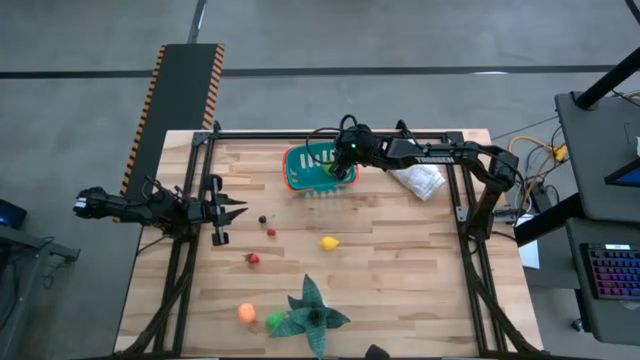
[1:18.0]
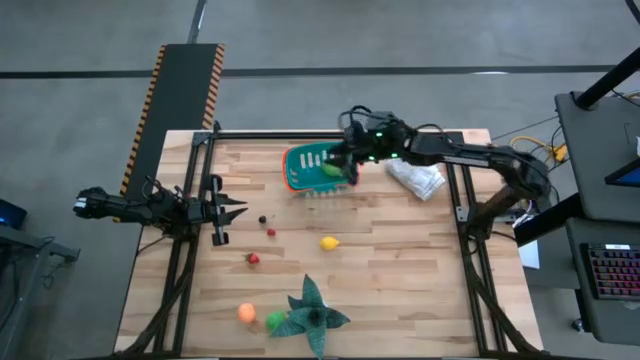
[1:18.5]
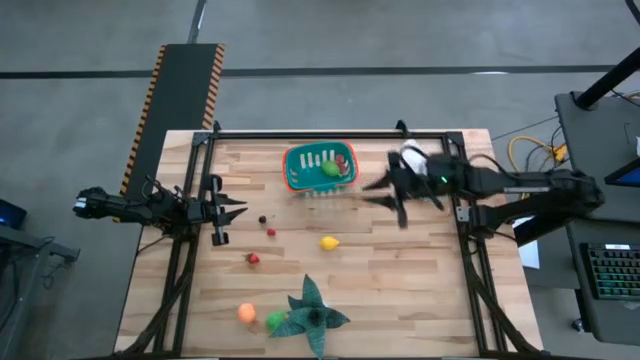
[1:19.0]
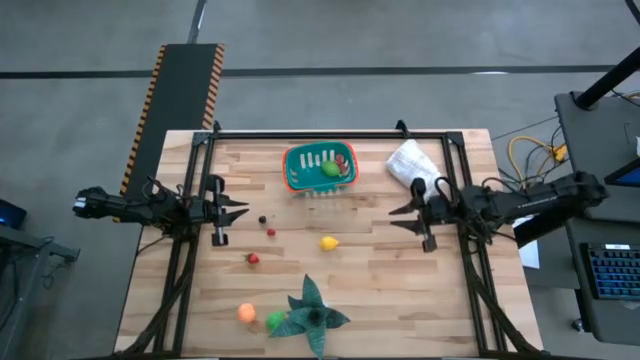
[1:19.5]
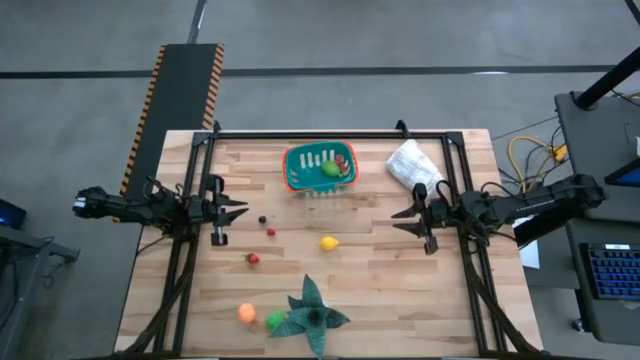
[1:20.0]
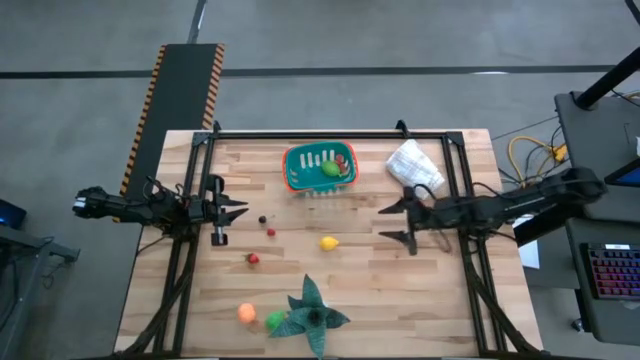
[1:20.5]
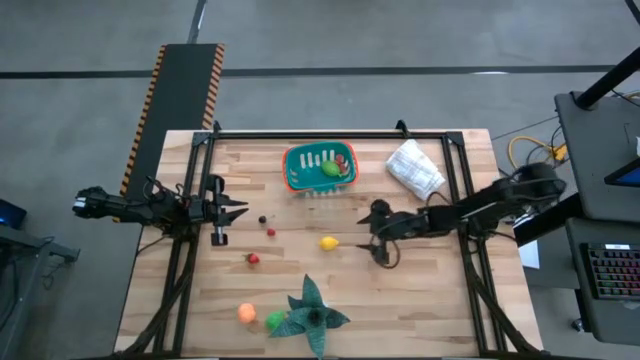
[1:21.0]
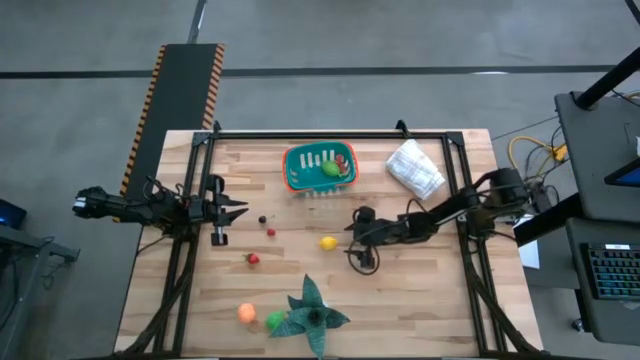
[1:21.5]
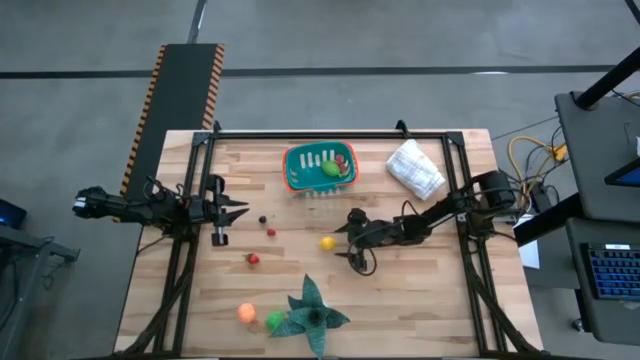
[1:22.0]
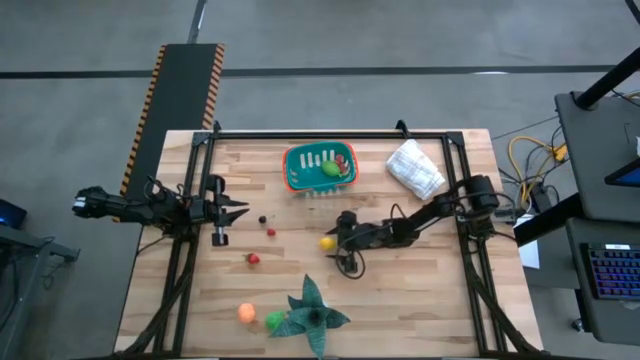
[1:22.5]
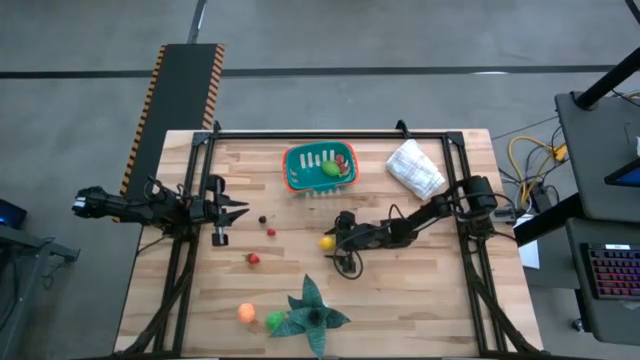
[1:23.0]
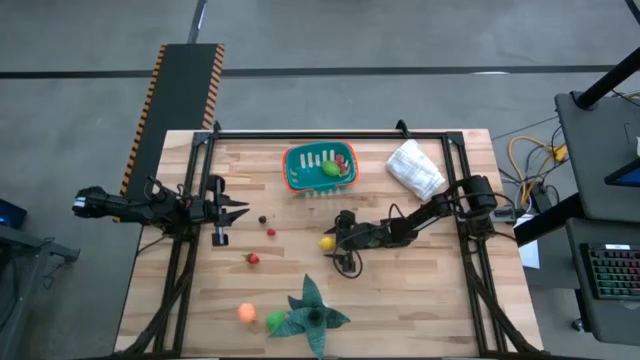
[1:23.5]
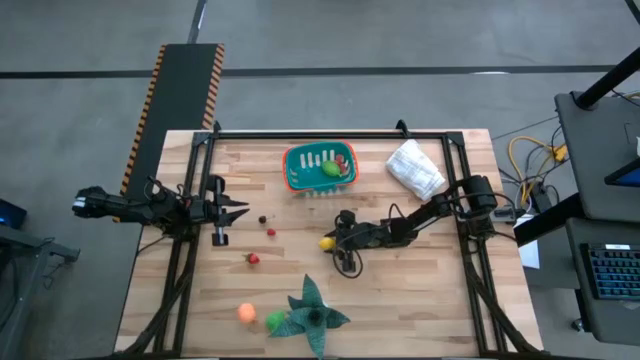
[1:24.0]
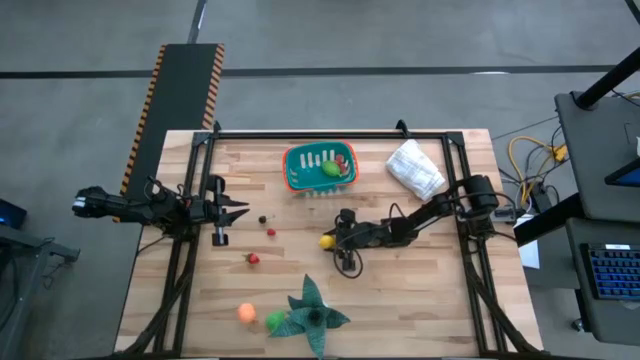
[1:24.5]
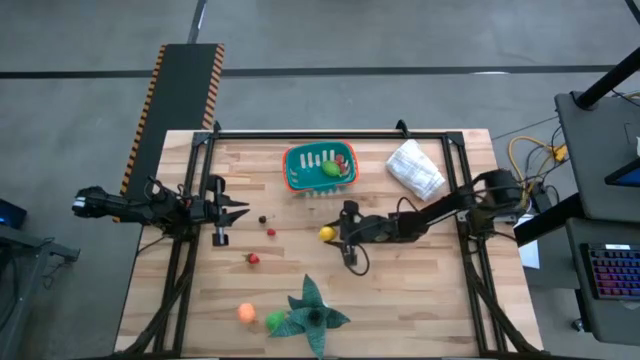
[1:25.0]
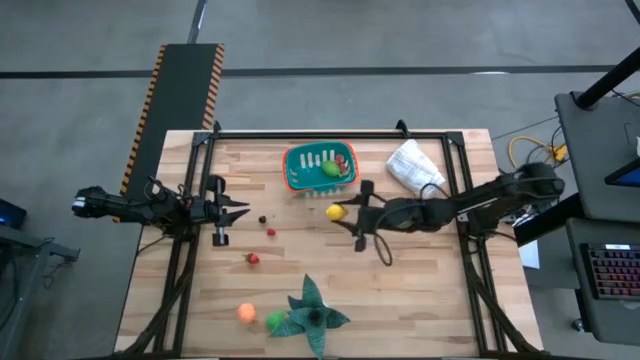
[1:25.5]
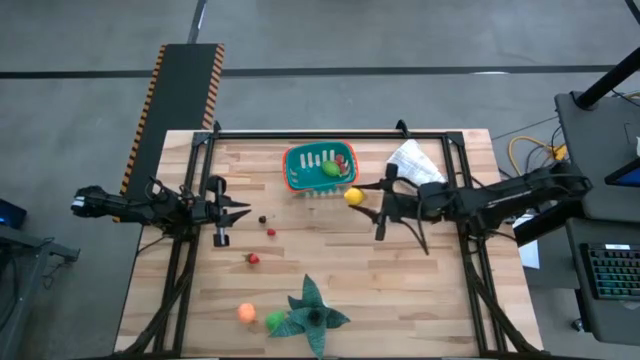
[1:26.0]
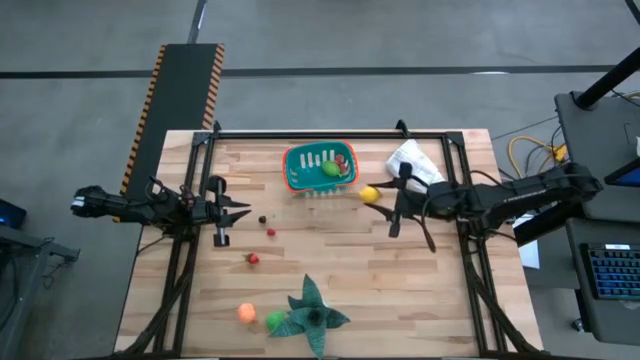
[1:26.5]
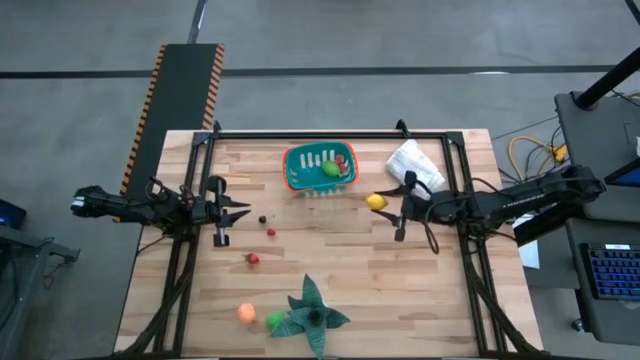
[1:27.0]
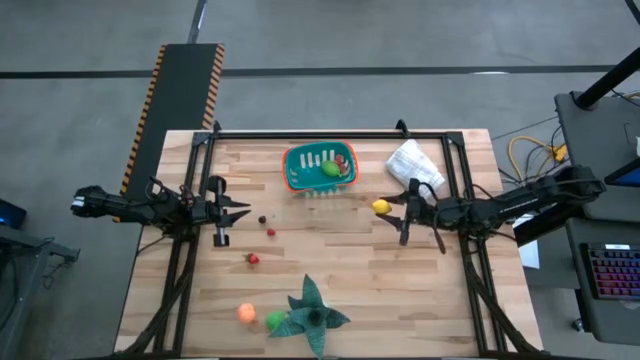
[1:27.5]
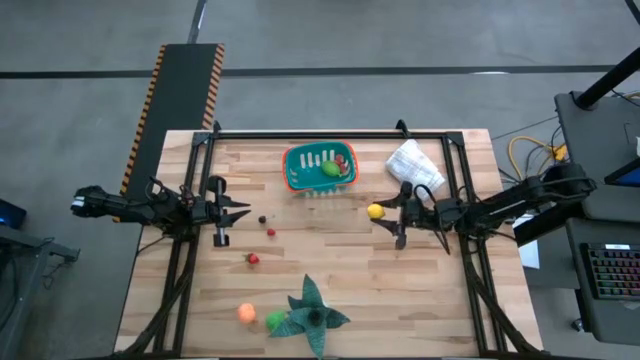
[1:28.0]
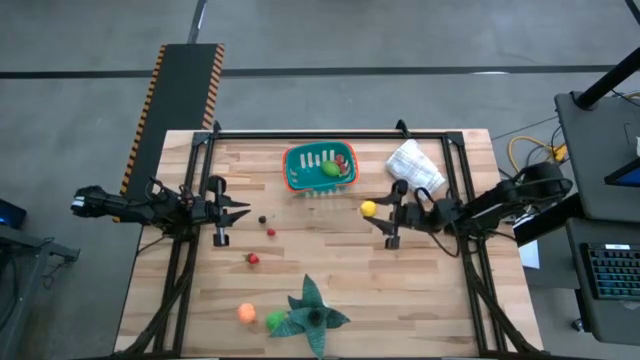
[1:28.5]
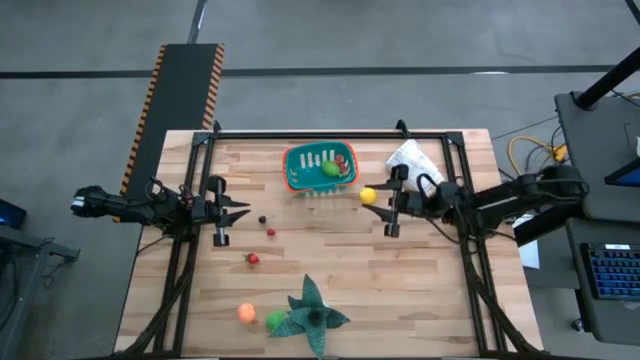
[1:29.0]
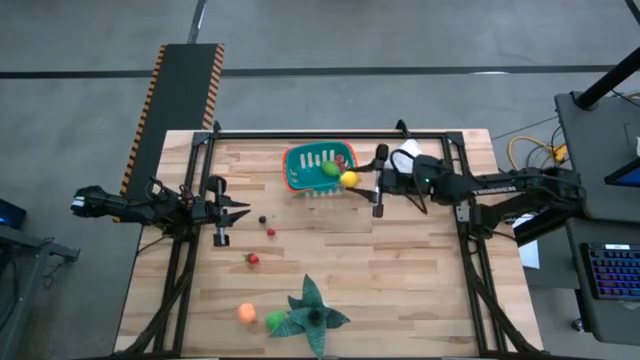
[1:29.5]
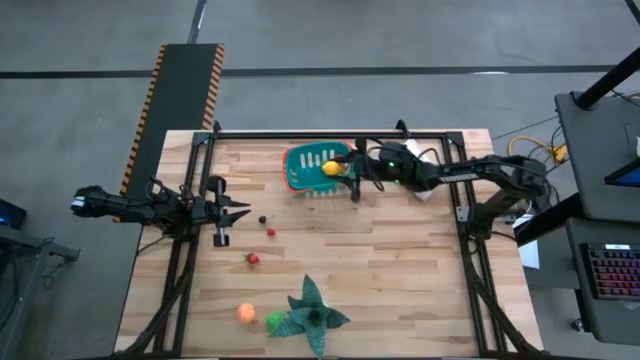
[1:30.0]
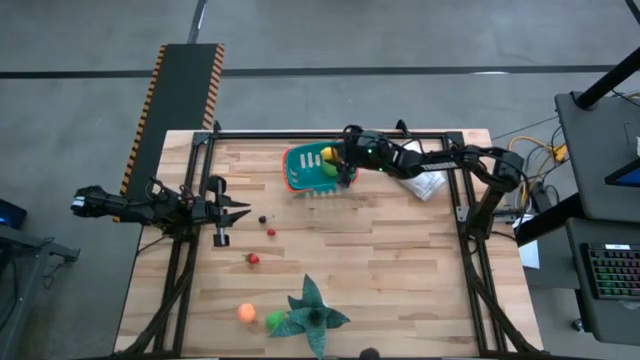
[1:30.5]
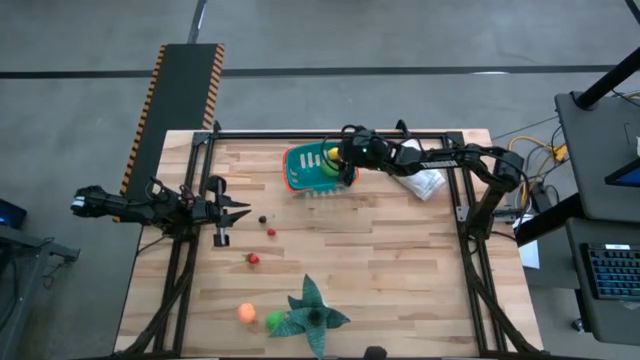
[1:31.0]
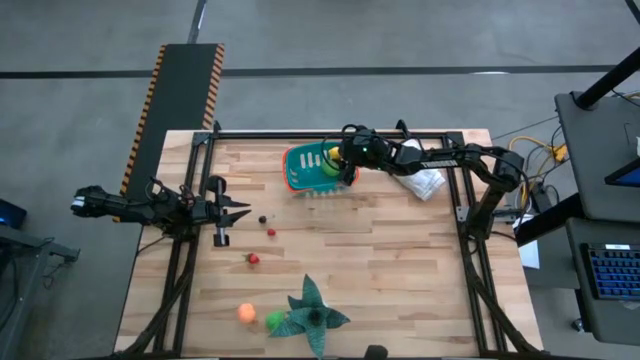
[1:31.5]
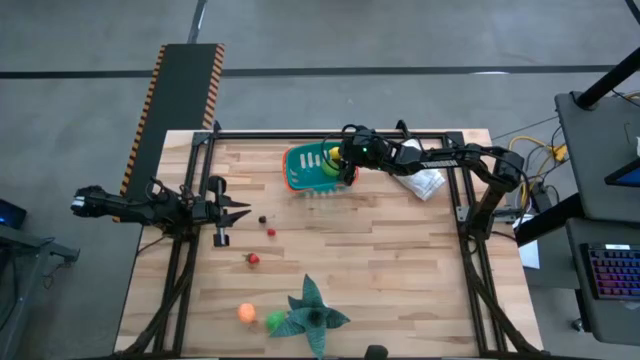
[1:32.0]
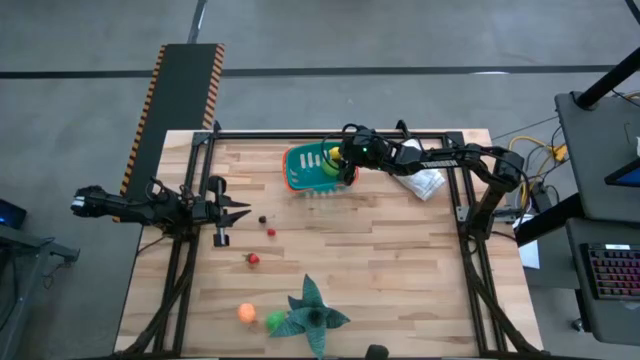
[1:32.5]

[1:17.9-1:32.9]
Task: Pick and placing Produce into tupperware
Put the yellow lemon toy into the bin

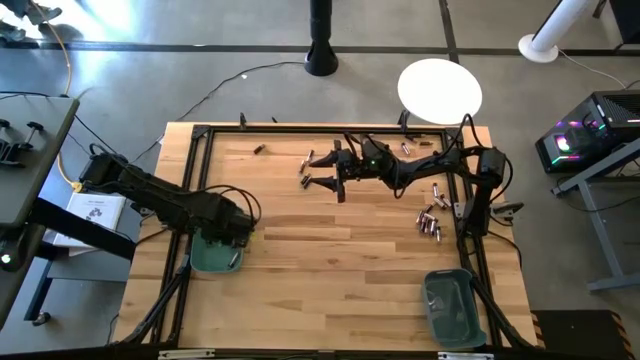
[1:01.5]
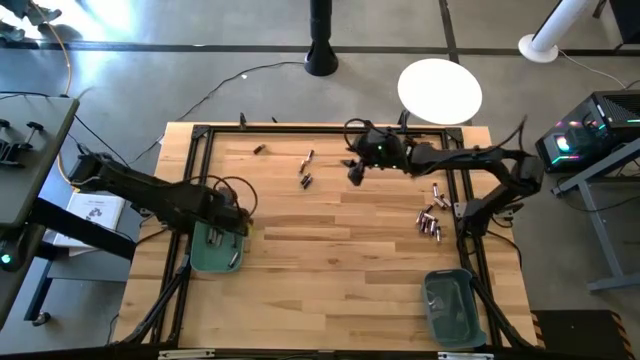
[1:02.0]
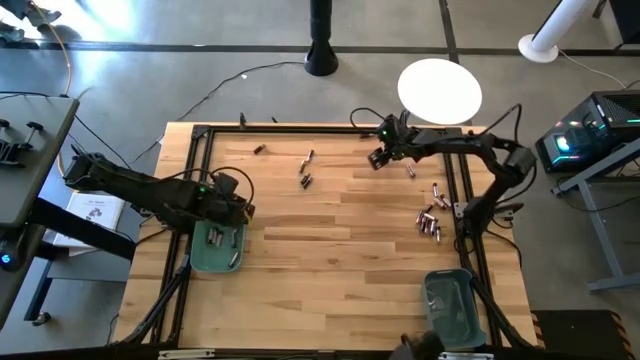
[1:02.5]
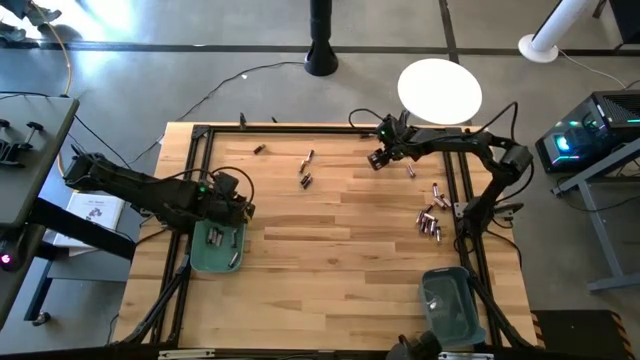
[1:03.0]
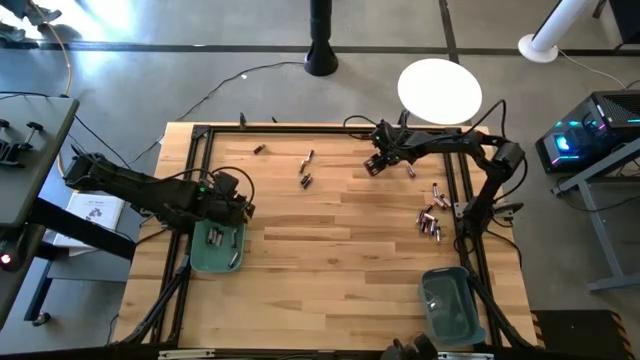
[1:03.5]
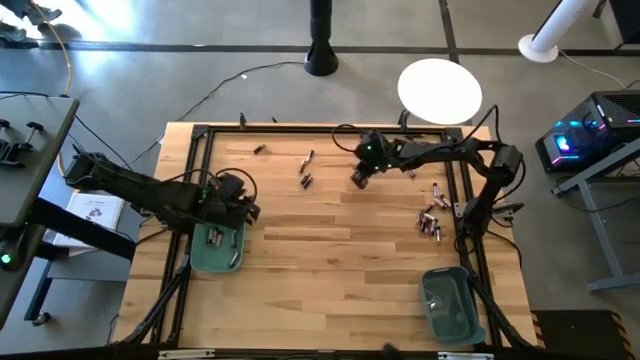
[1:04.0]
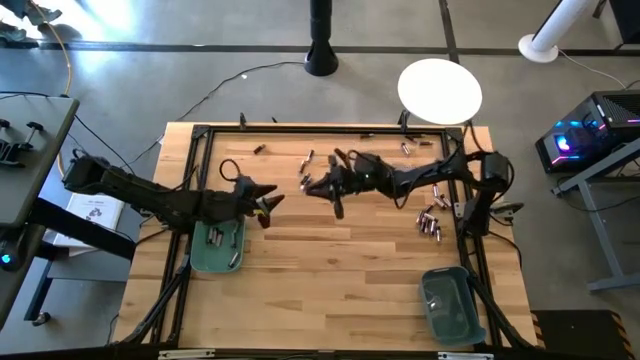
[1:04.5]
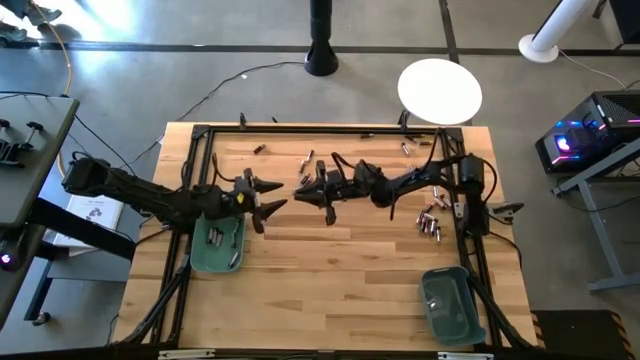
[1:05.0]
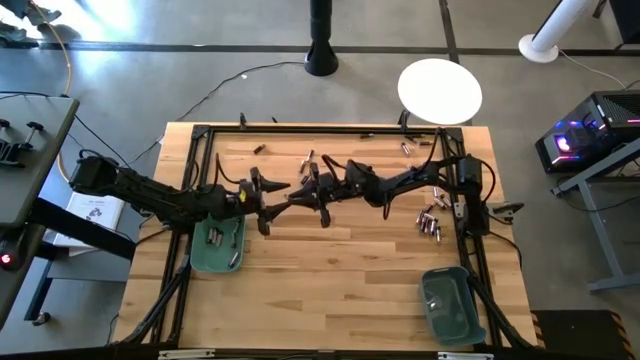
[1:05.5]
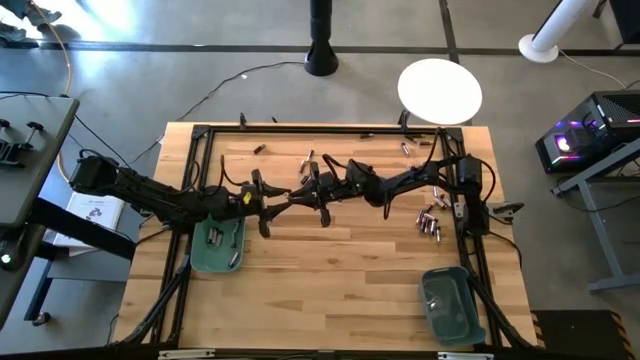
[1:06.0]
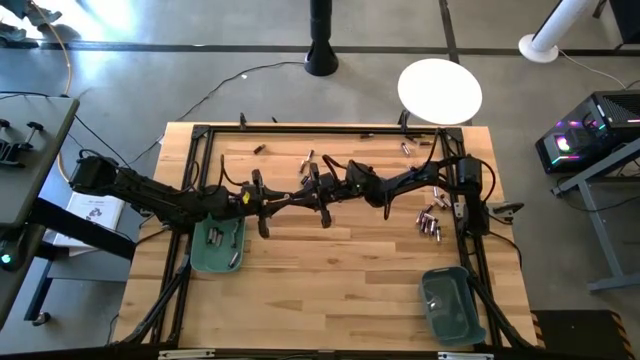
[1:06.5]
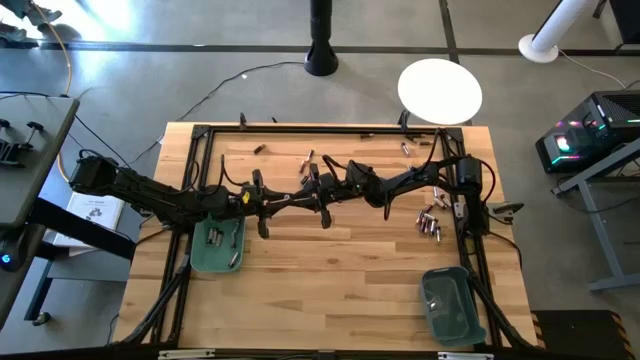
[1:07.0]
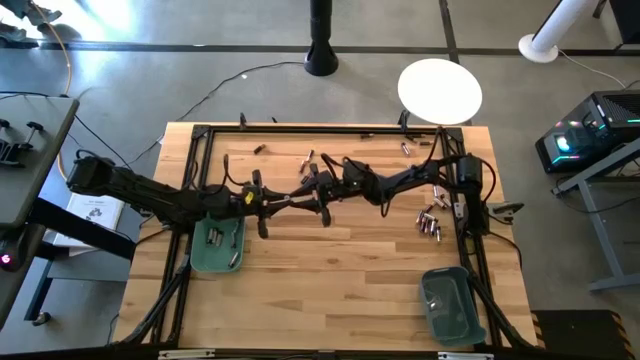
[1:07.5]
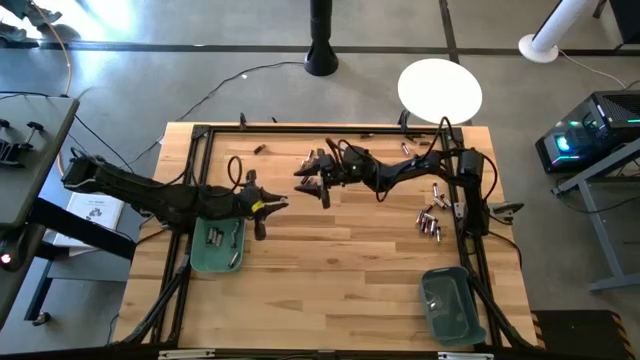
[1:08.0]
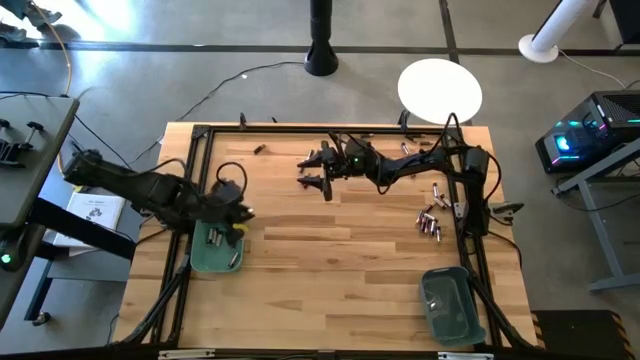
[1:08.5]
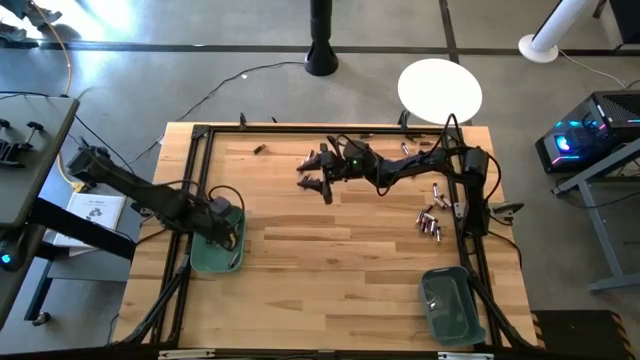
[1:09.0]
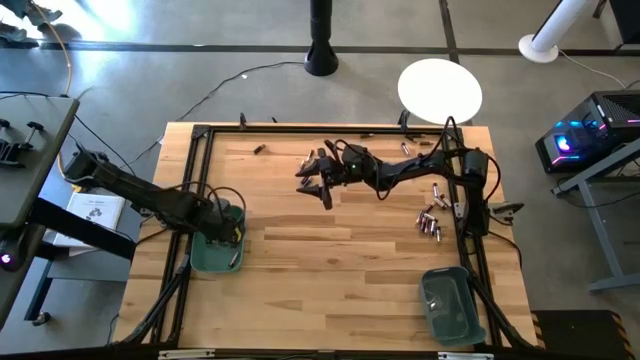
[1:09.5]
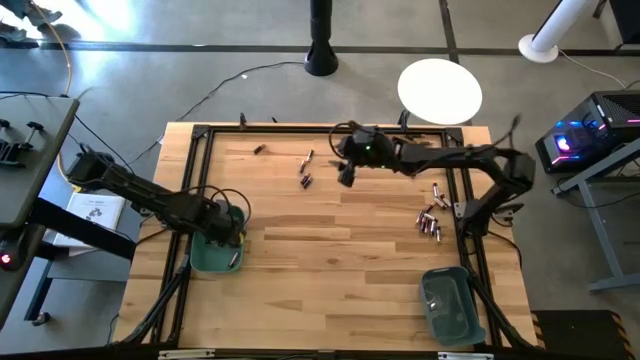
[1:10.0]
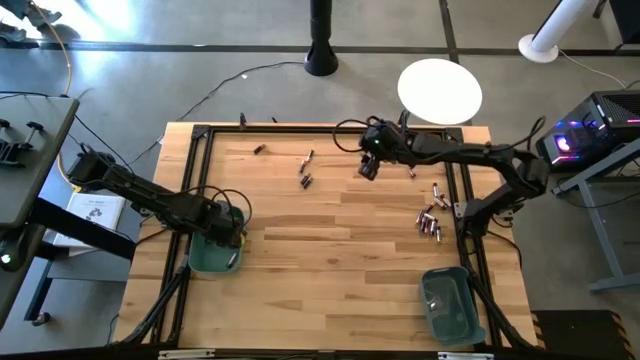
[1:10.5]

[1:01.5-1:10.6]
Task: Sort batteries
Put the silver battery into the green bin
